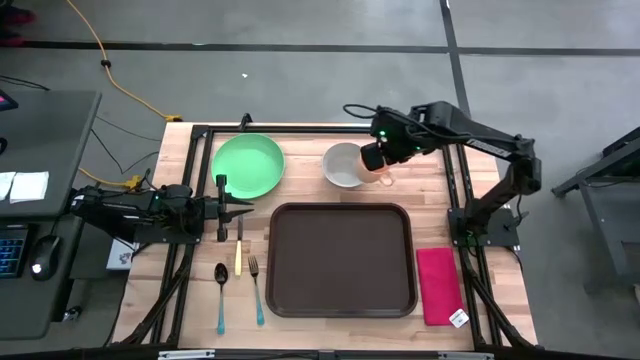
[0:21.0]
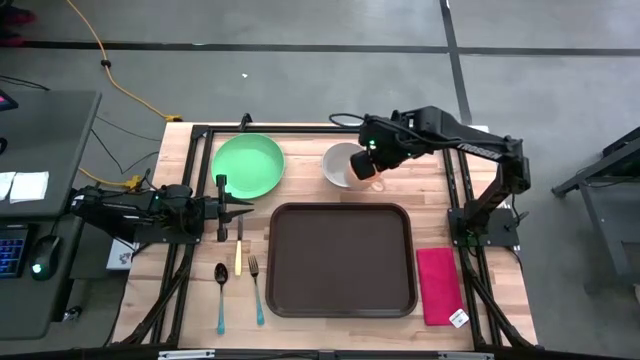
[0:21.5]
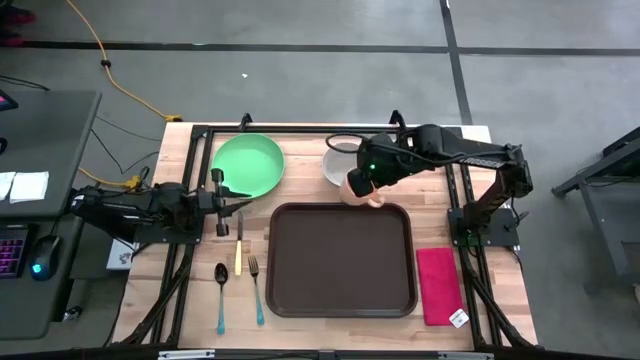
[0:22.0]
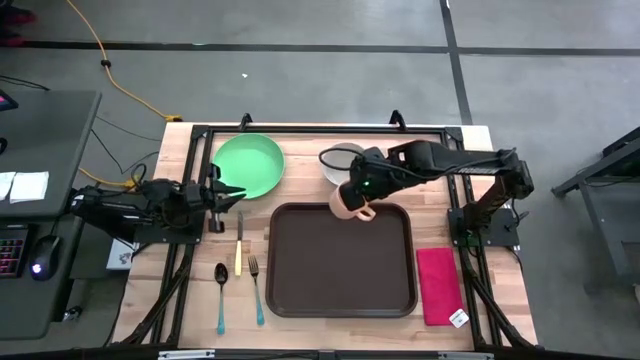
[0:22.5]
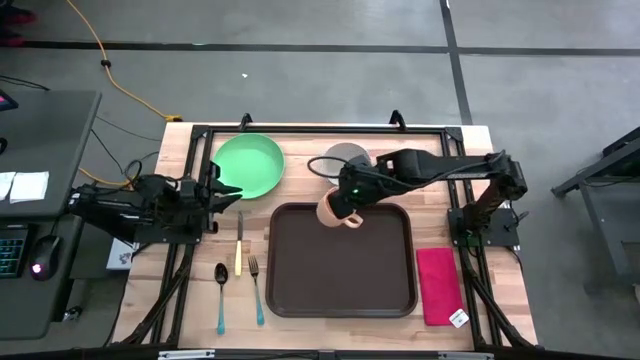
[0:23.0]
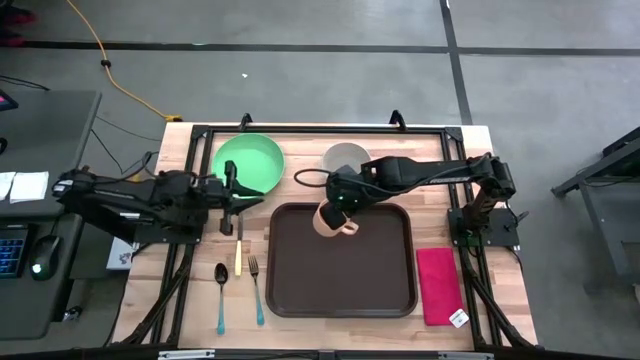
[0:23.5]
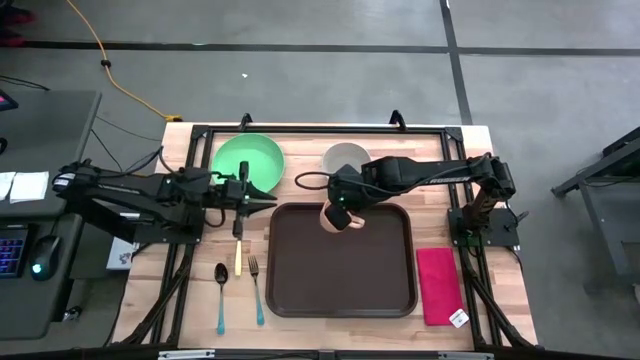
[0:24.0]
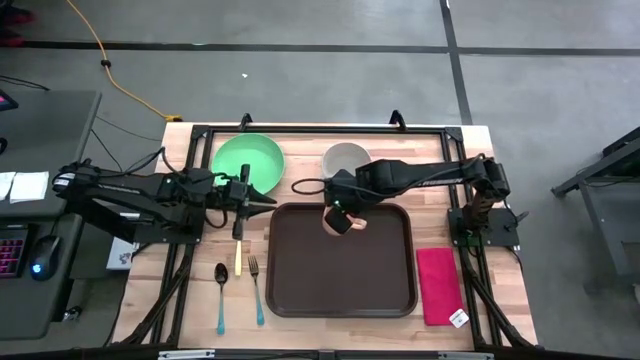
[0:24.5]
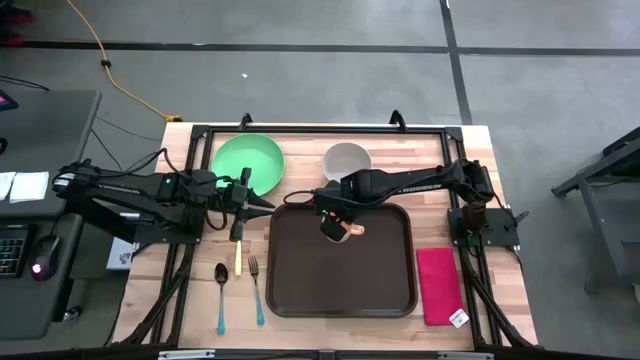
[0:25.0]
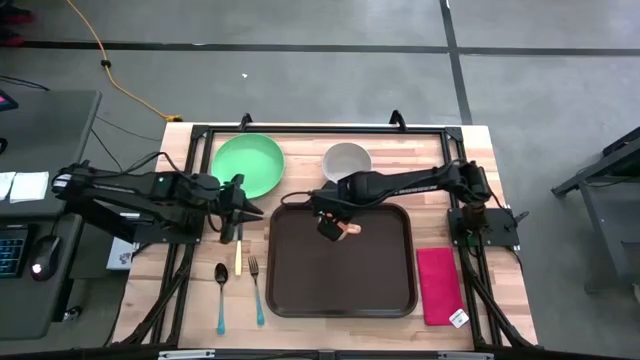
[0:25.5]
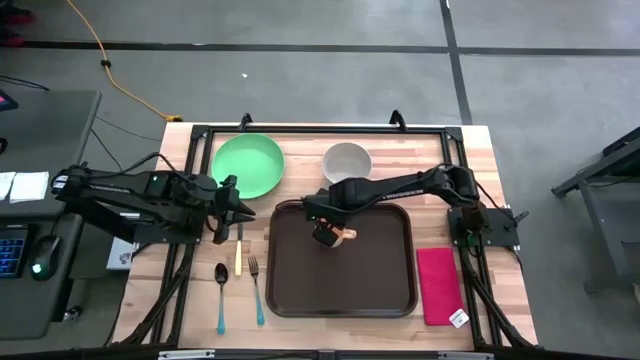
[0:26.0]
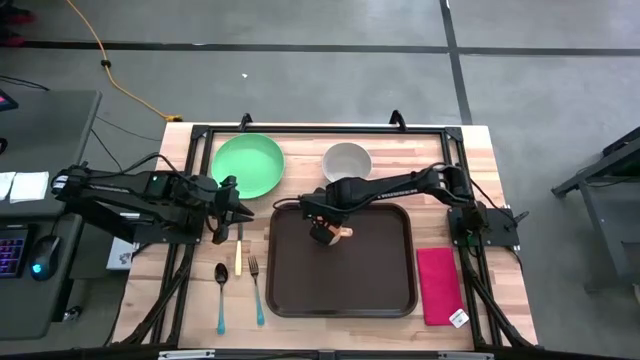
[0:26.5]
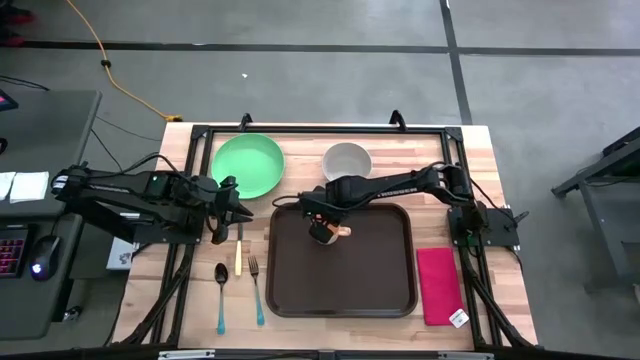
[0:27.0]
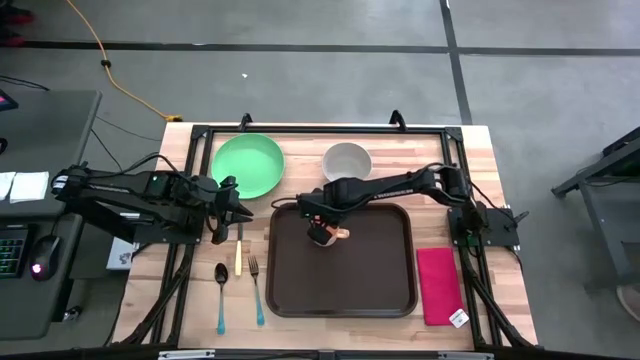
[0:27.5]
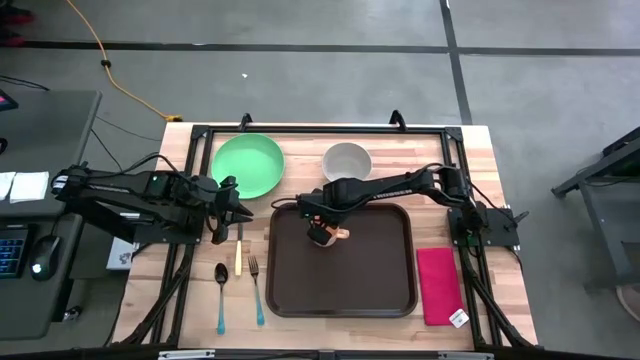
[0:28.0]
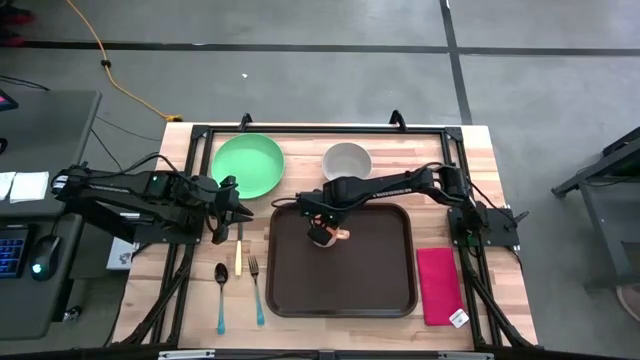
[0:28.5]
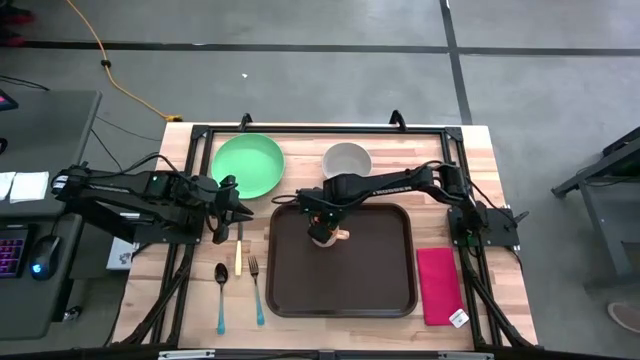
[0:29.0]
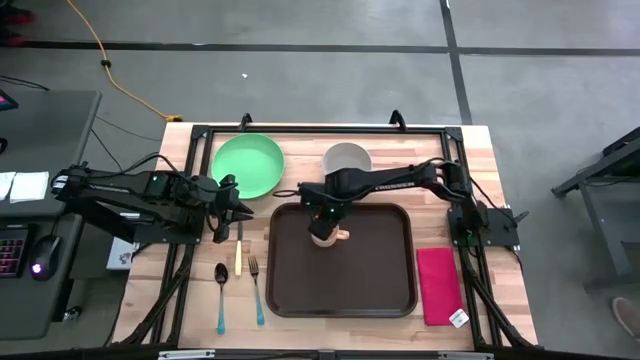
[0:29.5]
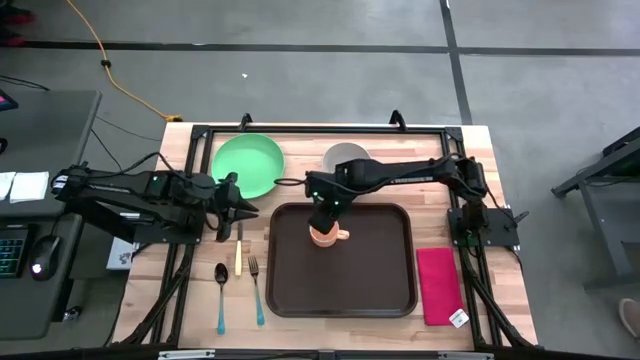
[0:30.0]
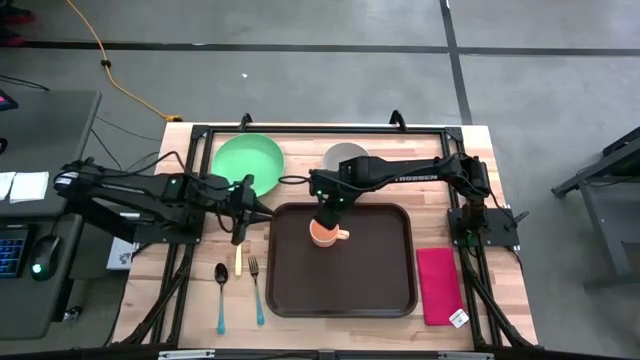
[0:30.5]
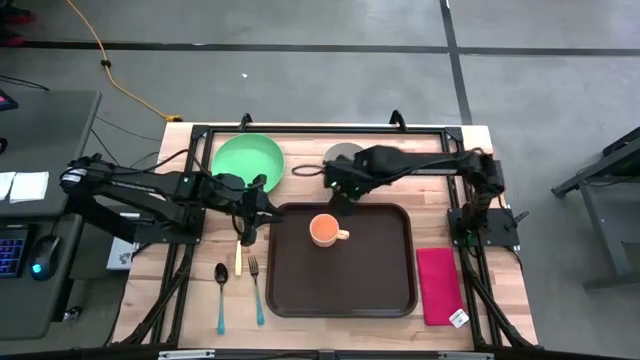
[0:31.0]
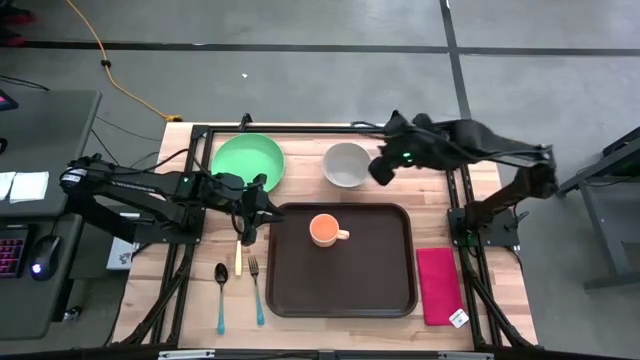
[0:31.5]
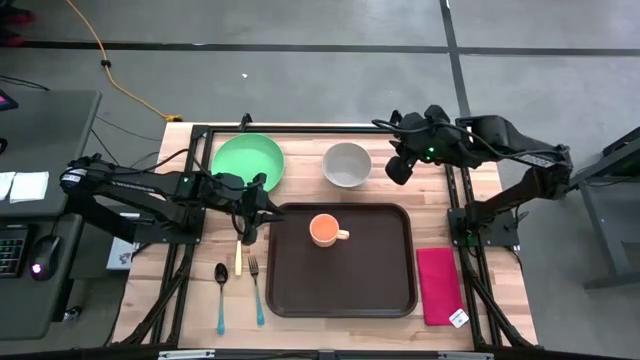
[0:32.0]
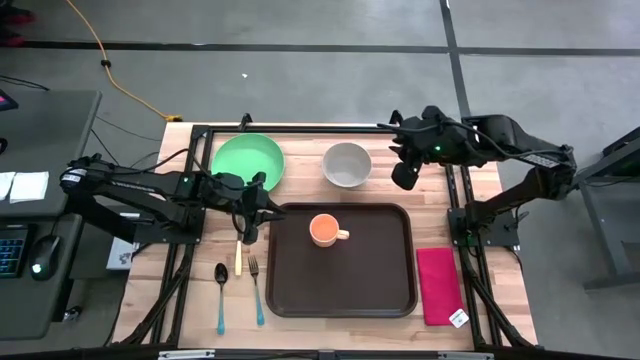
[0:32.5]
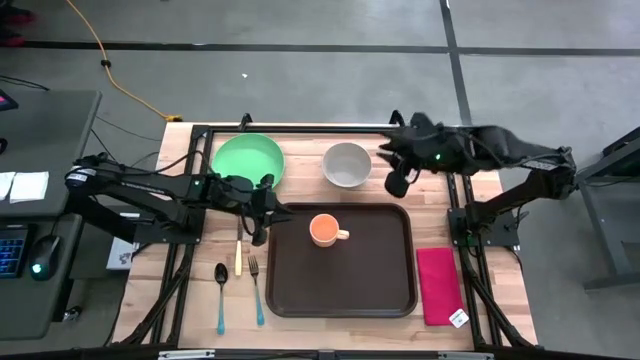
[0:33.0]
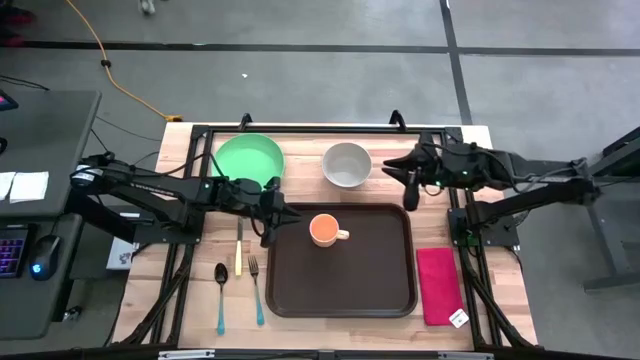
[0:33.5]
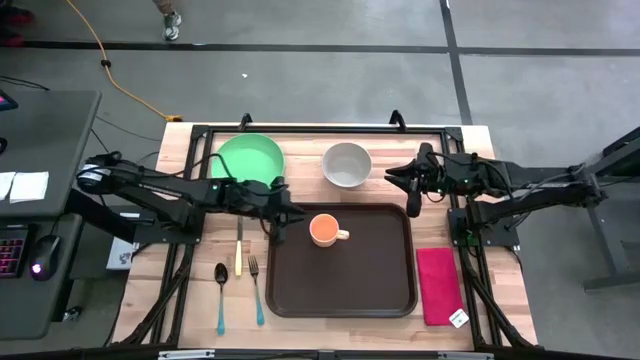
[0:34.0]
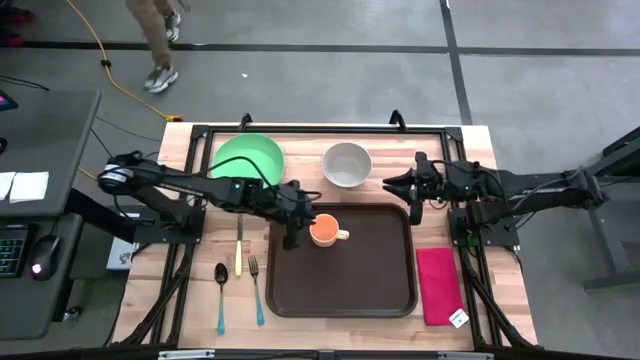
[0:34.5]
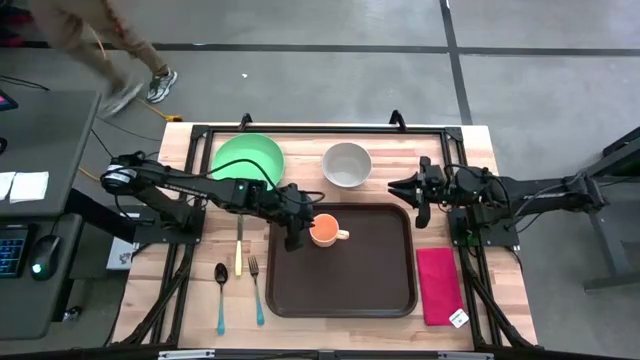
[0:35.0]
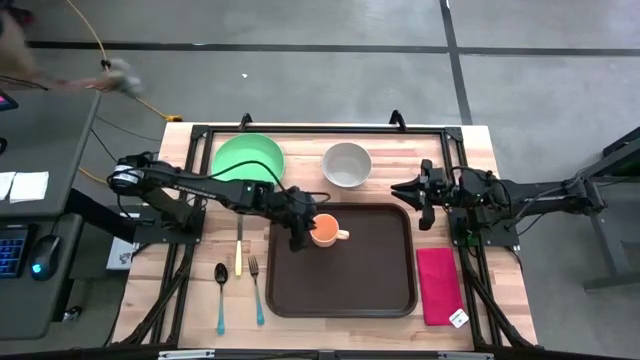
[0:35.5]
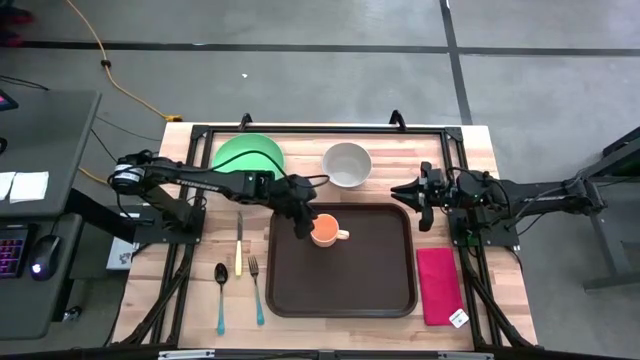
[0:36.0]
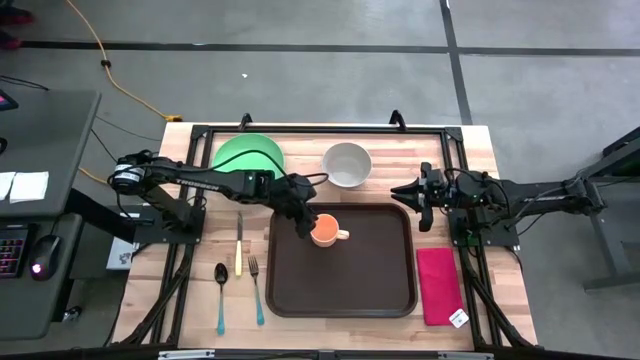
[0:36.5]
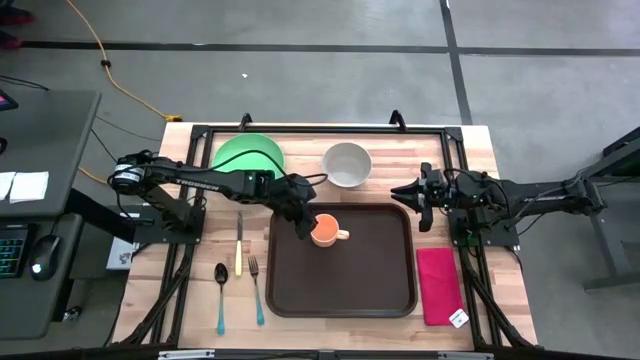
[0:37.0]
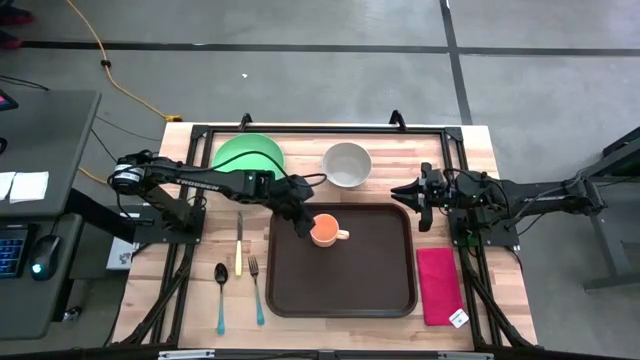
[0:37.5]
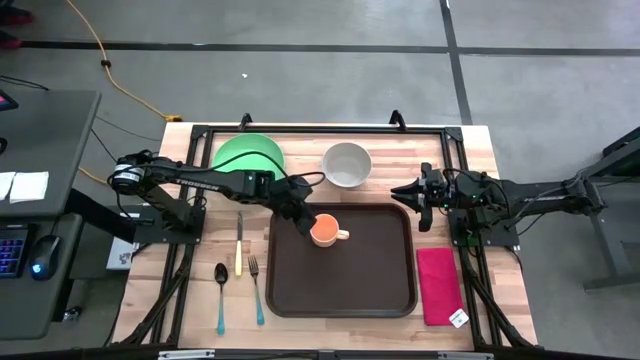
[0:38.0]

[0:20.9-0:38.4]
Task: Set up tray
Put the yellow mug on the brown tray
